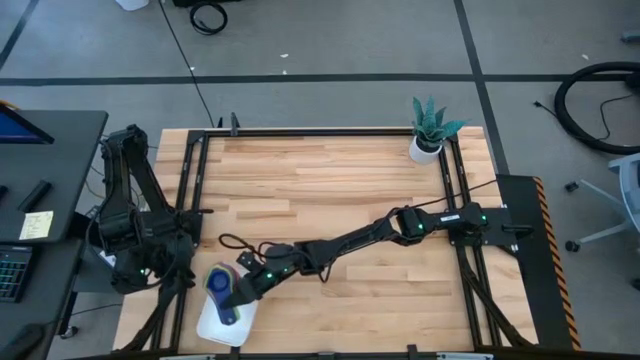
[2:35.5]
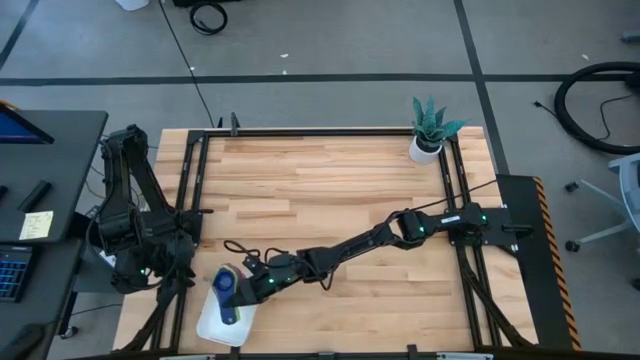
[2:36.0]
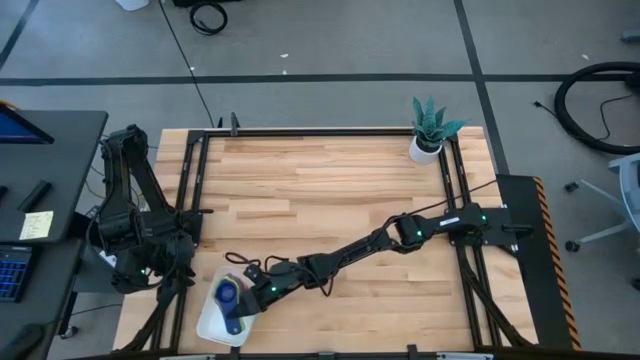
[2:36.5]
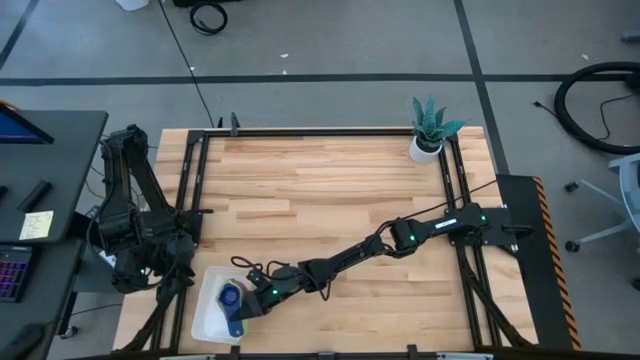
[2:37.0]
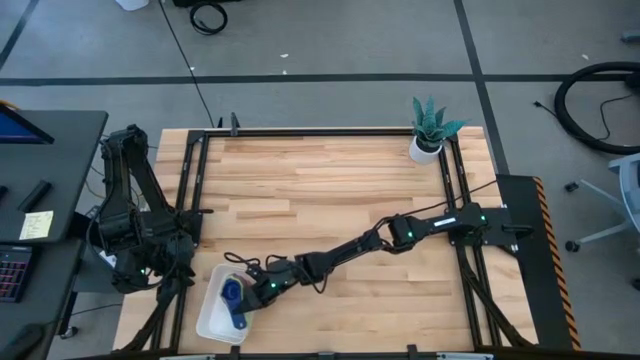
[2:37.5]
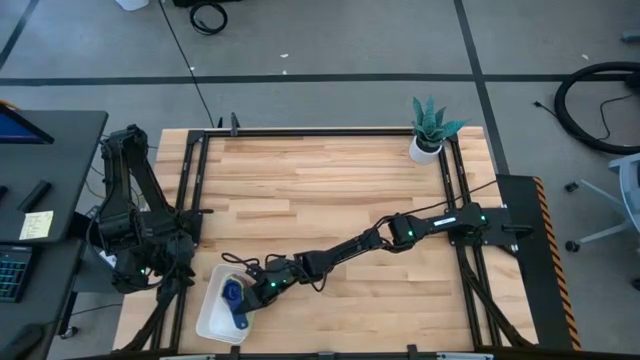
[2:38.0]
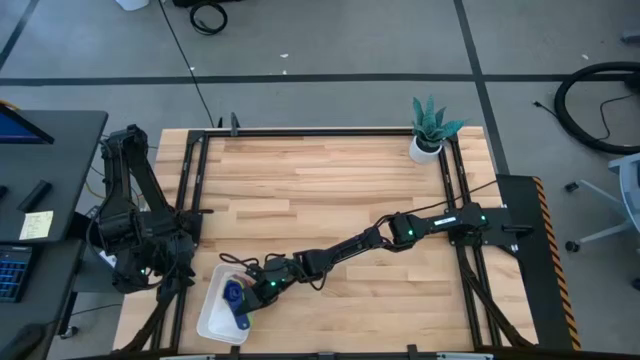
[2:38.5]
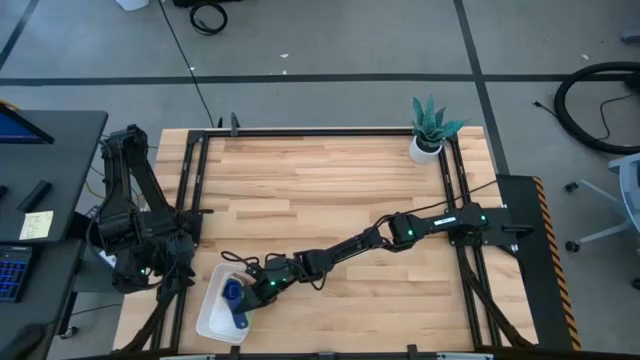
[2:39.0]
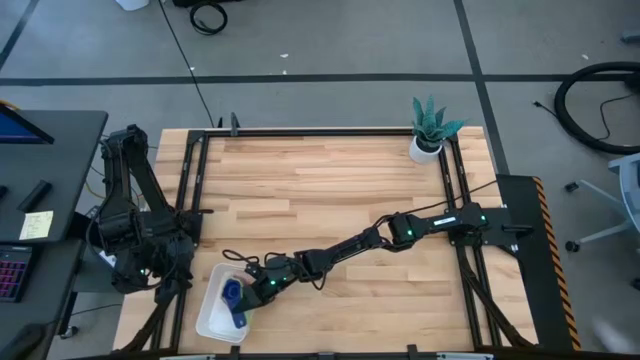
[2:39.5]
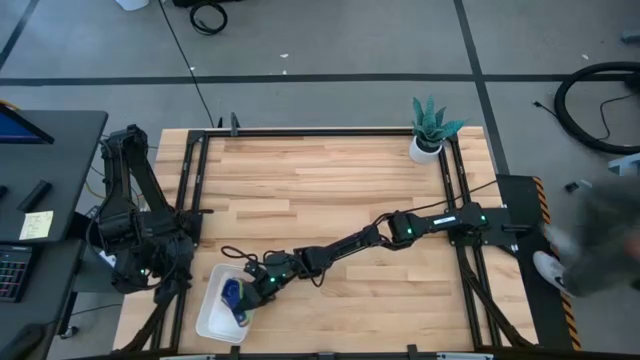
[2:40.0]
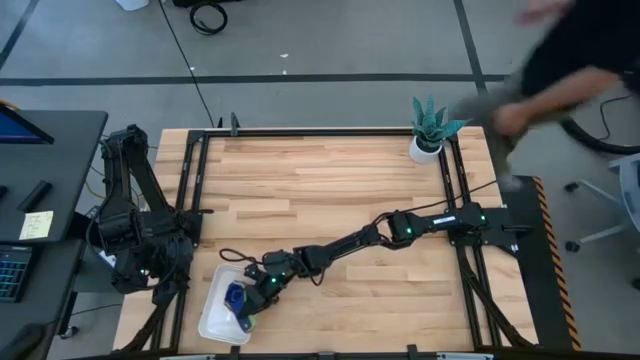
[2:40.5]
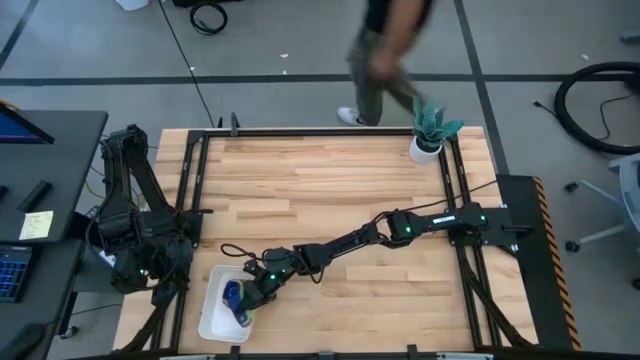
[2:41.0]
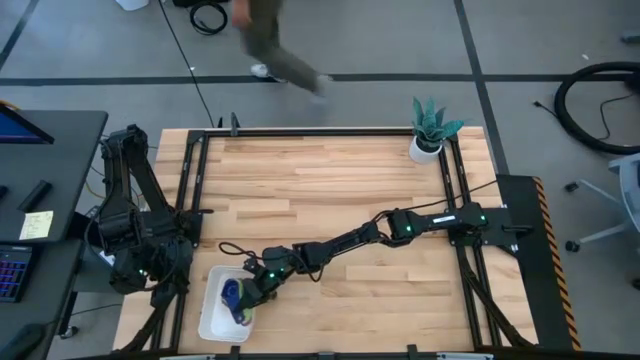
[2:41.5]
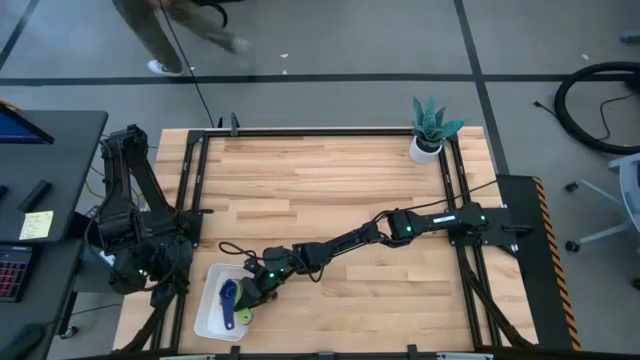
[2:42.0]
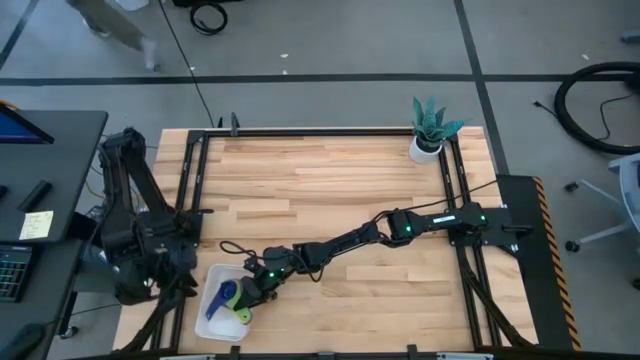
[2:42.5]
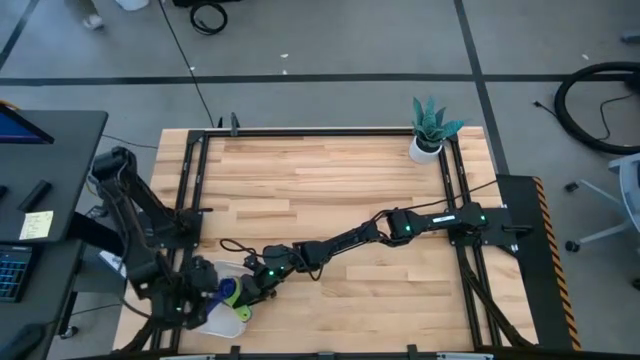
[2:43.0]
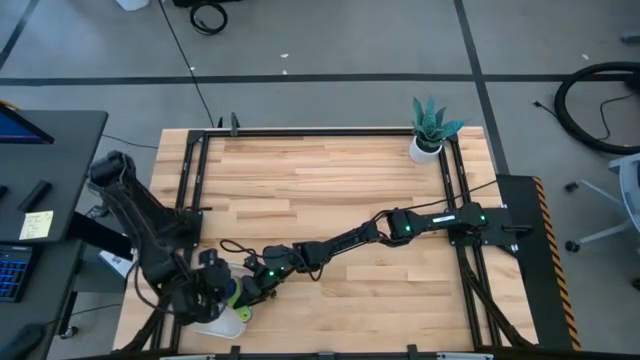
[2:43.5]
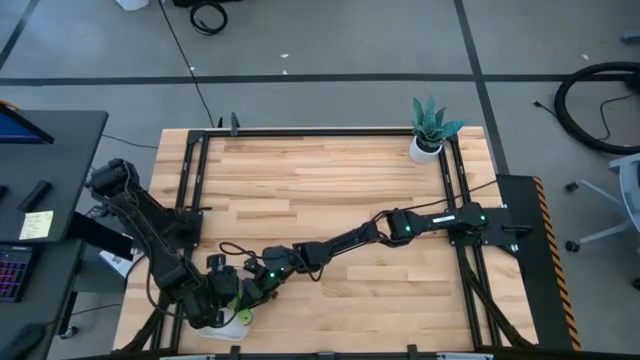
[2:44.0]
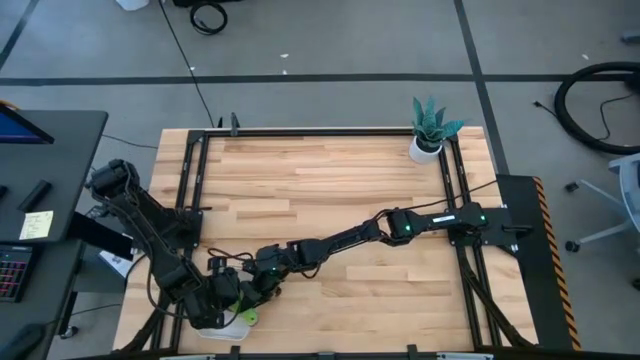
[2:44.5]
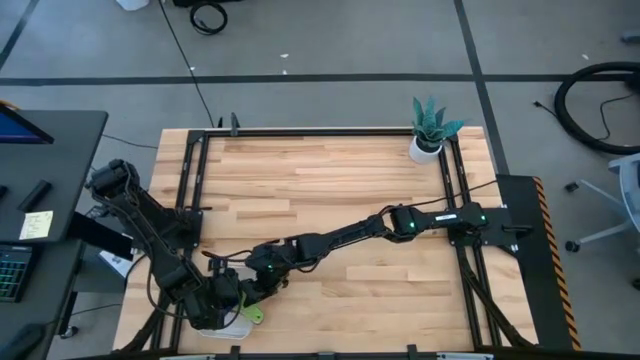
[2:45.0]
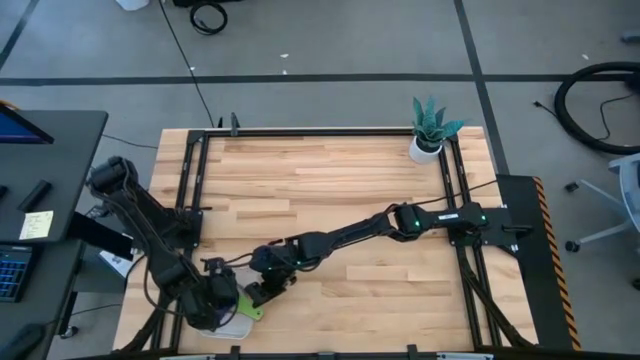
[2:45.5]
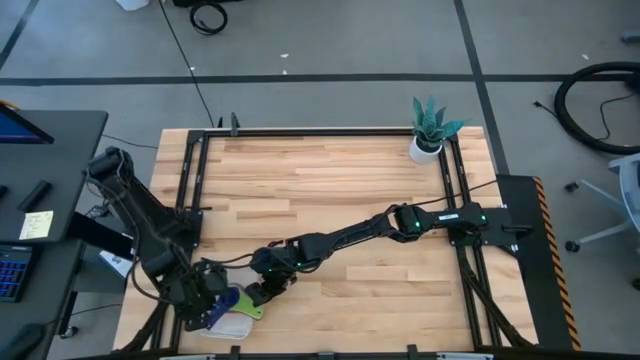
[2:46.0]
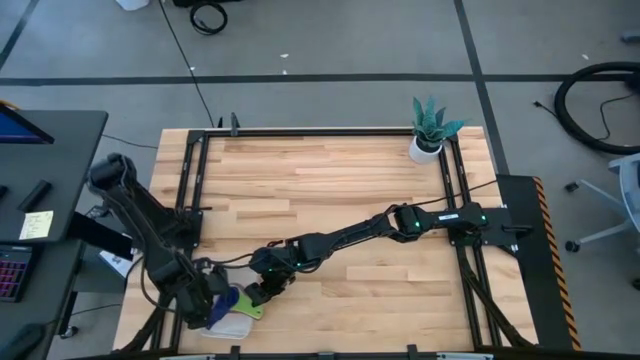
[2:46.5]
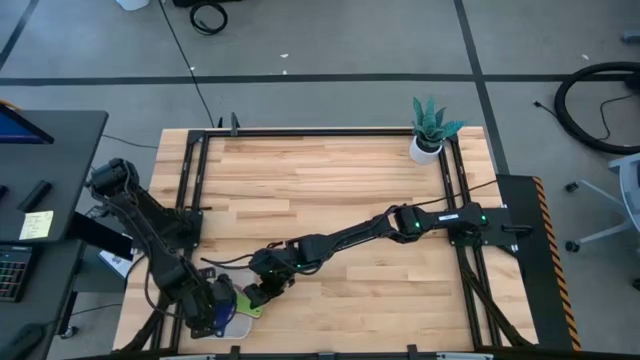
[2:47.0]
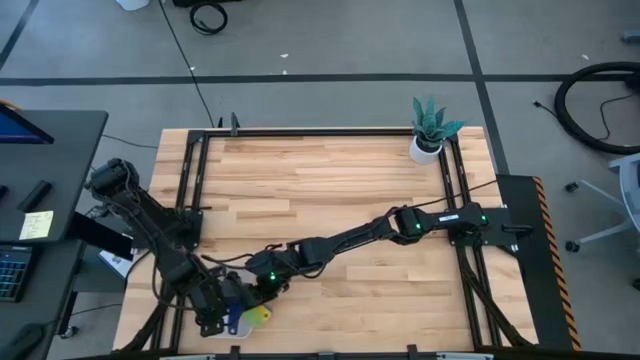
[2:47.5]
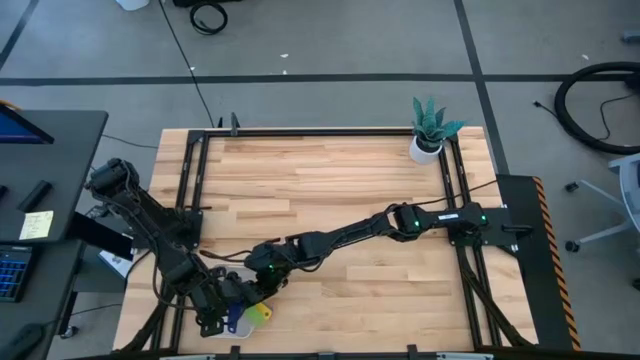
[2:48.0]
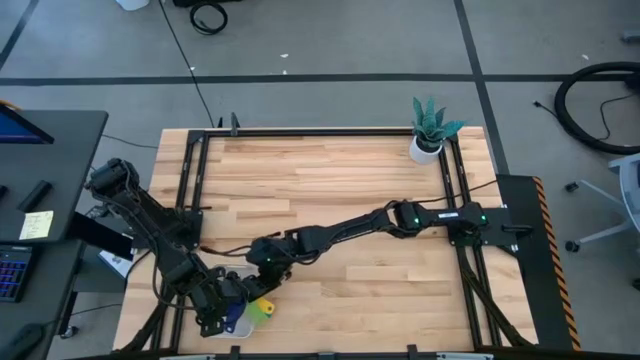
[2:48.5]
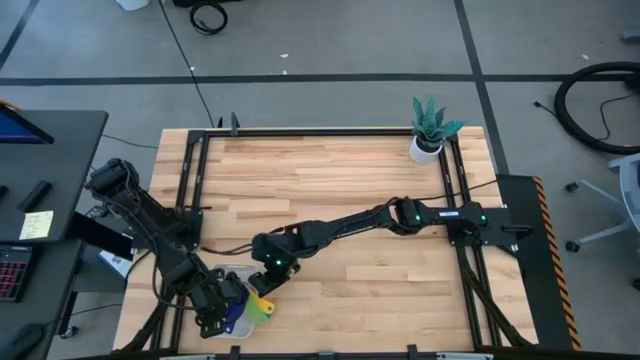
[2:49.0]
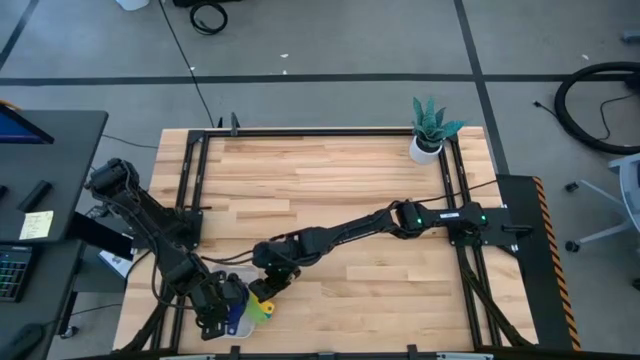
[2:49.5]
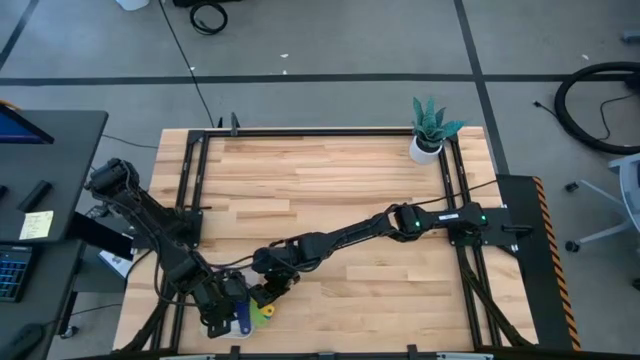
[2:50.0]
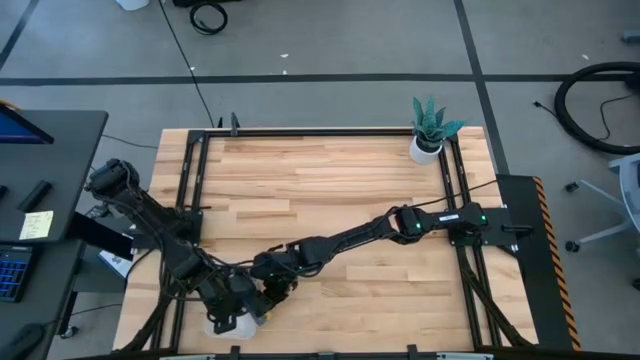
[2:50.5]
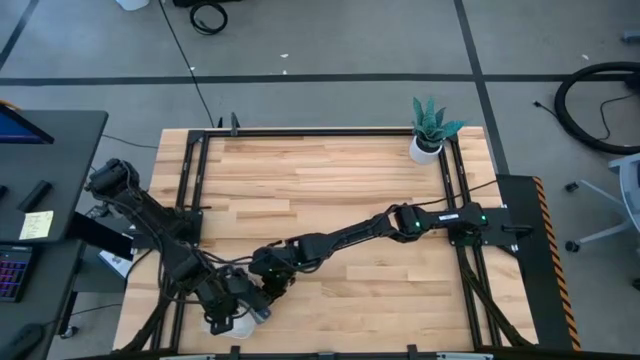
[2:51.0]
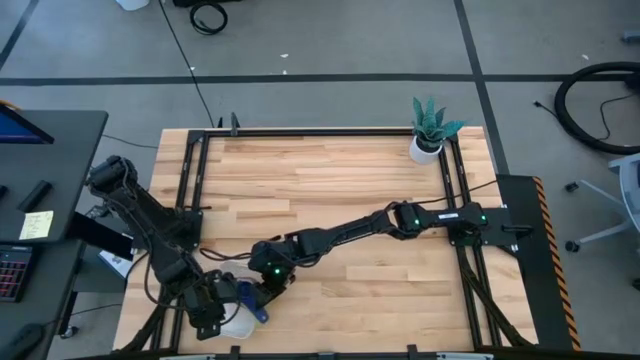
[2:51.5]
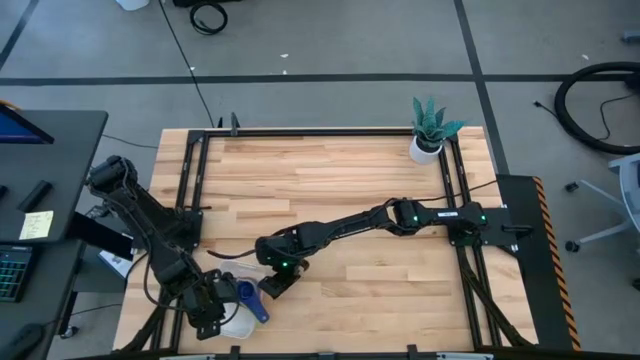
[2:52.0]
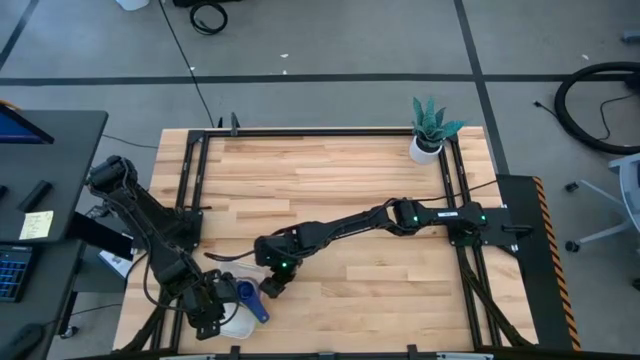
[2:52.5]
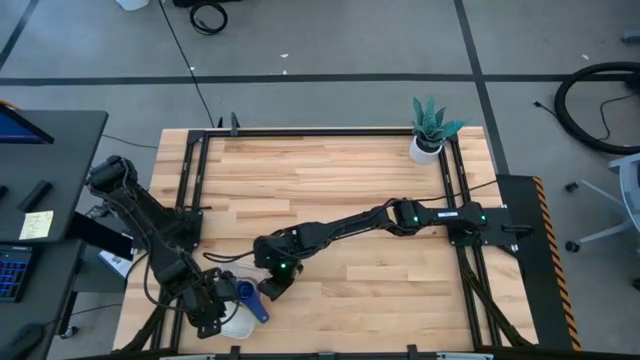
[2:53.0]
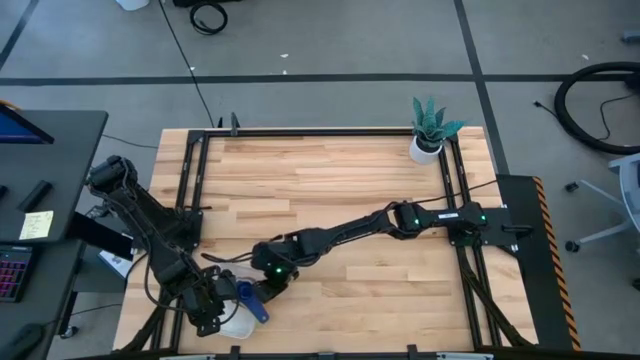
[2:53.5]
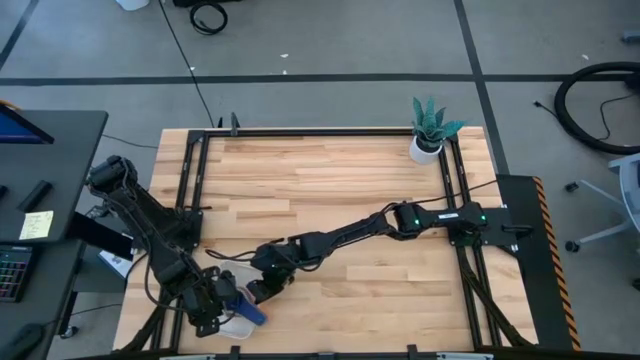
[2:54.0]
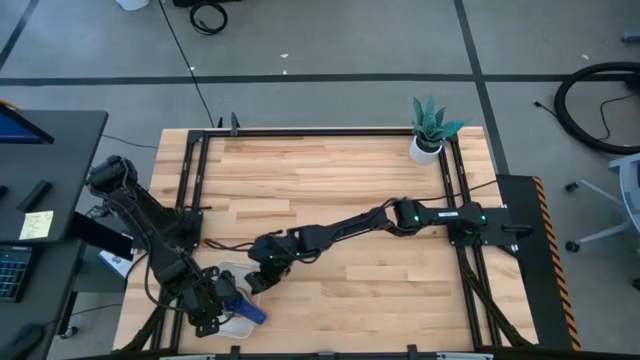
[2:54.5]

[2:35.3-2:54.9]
Task: Nest measuring cups in basket
Put the nested measuring cups into the white bin

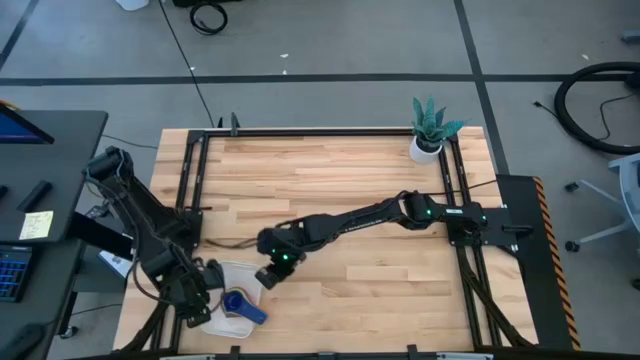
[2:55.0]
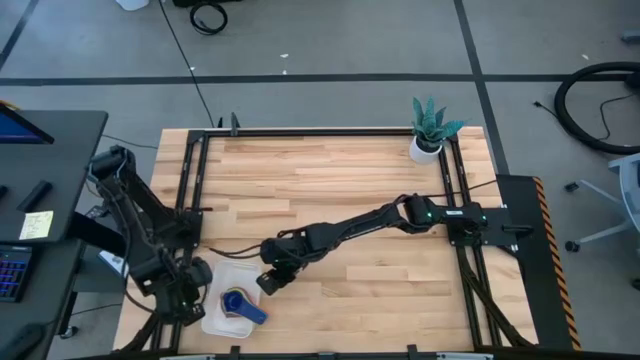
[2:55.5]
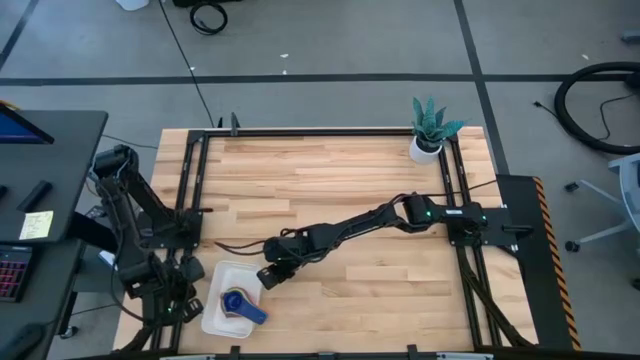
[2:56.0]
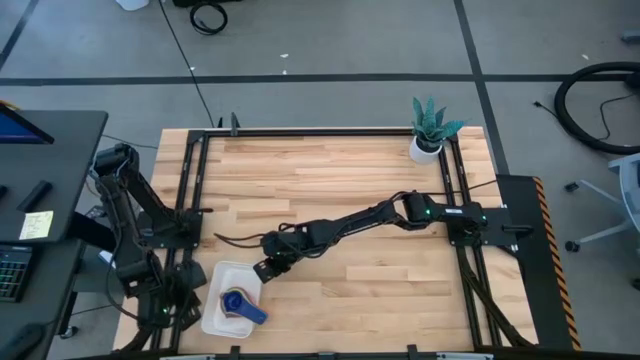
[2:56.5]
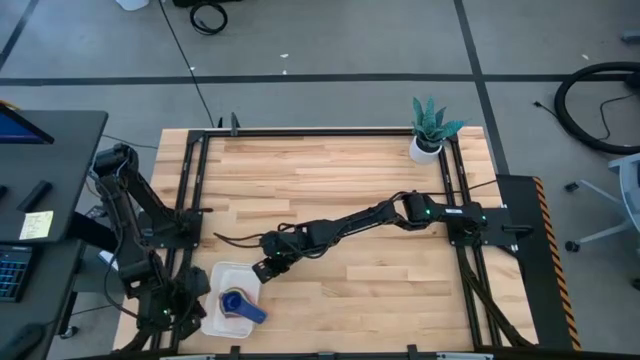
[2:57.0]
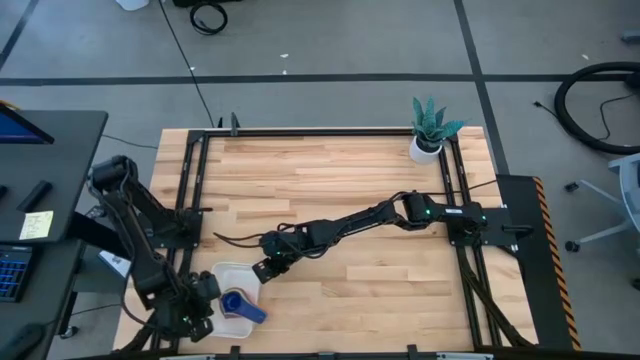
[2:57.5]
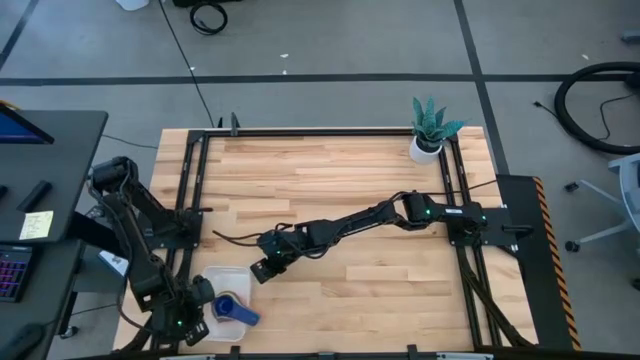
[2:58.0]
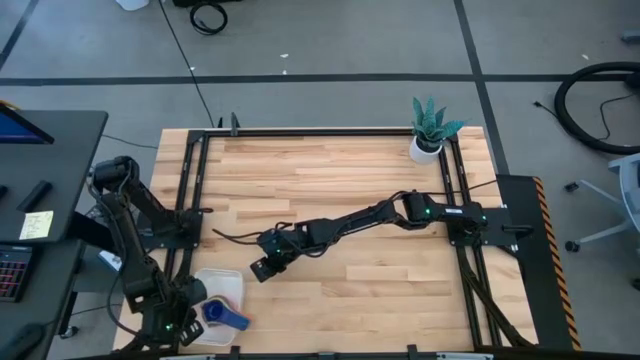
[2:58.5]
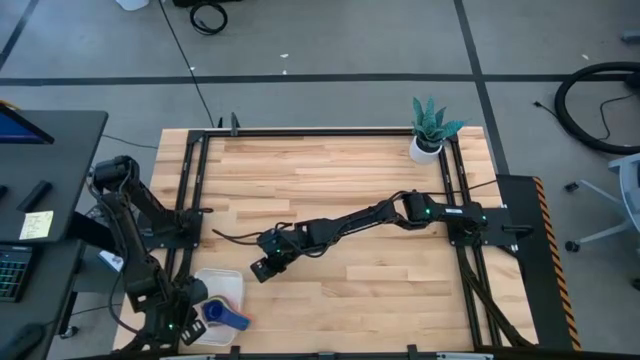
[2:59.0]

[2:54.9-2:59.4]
Adjust the white bin
